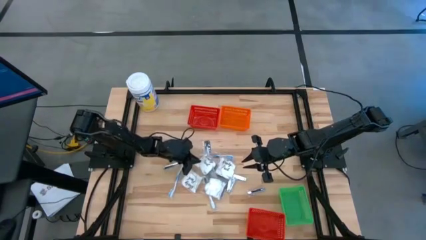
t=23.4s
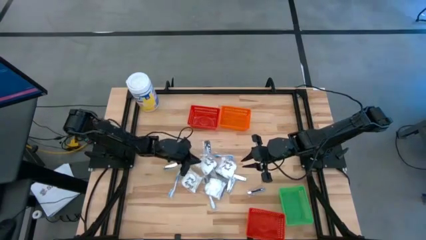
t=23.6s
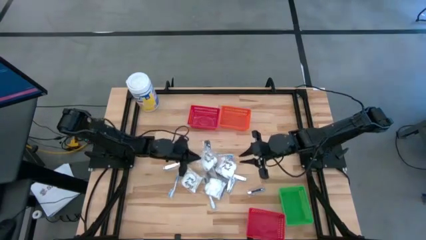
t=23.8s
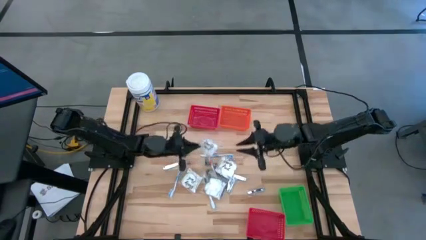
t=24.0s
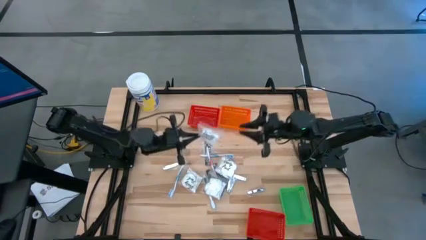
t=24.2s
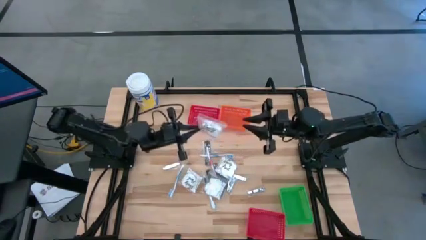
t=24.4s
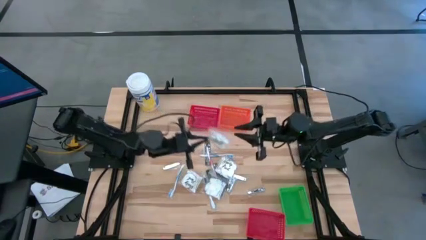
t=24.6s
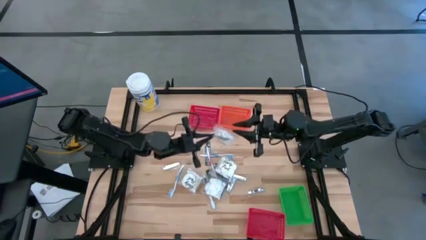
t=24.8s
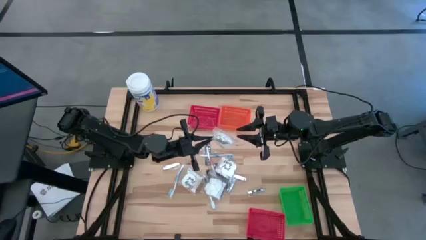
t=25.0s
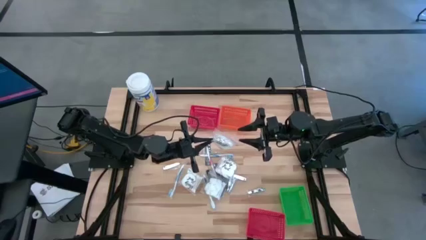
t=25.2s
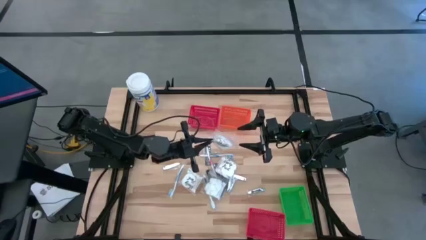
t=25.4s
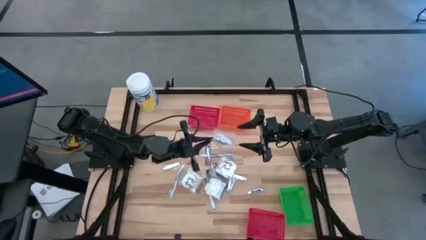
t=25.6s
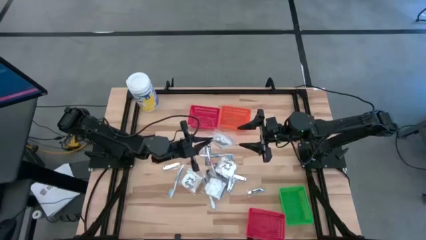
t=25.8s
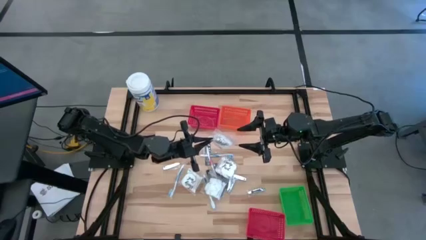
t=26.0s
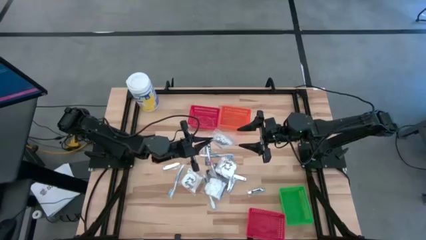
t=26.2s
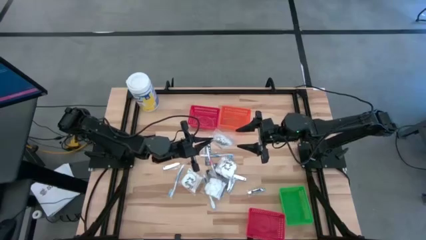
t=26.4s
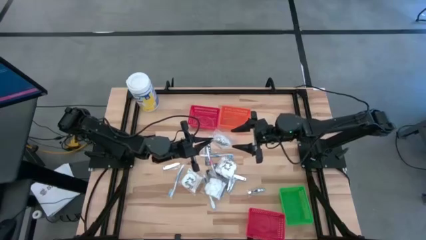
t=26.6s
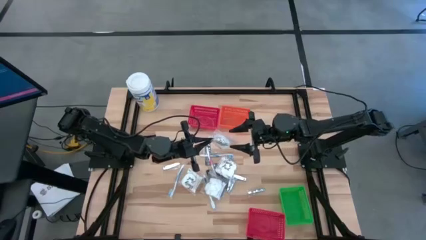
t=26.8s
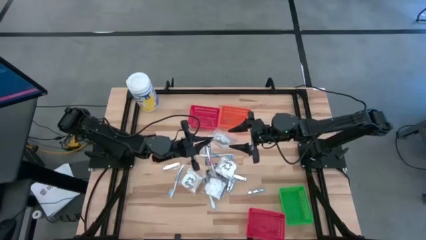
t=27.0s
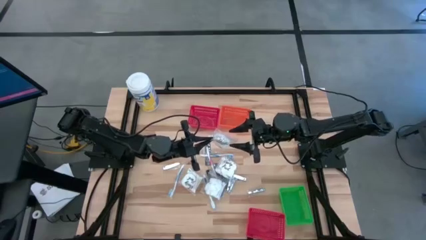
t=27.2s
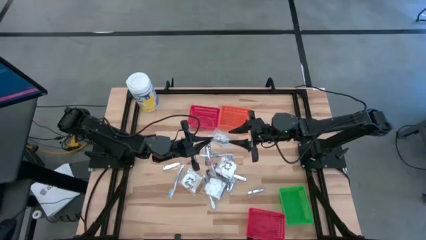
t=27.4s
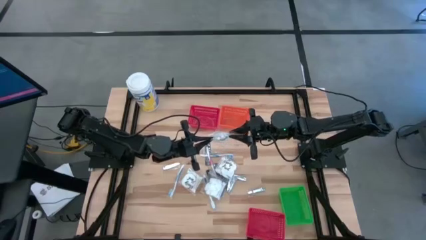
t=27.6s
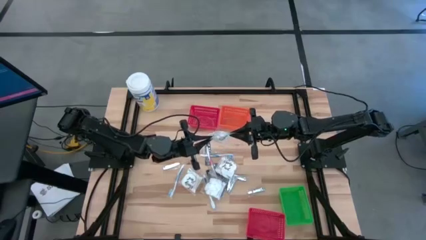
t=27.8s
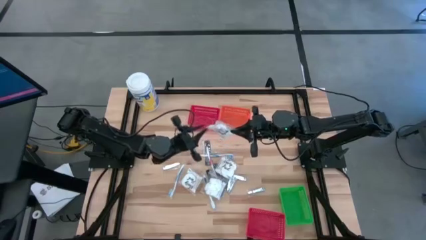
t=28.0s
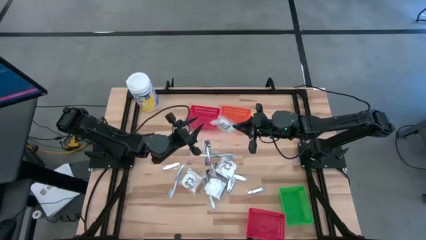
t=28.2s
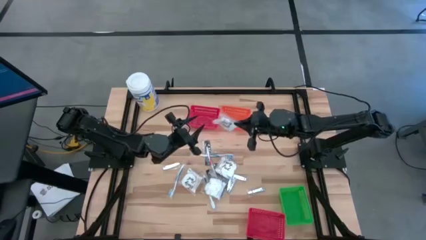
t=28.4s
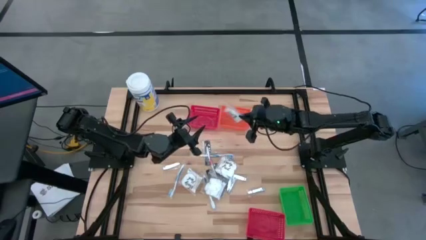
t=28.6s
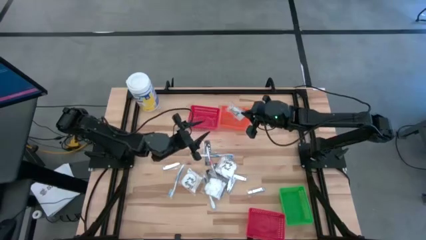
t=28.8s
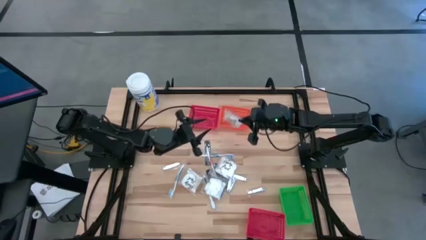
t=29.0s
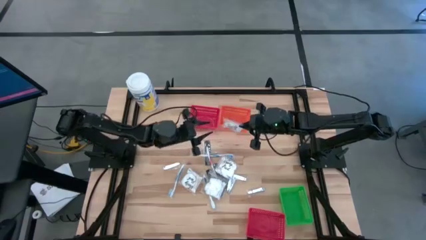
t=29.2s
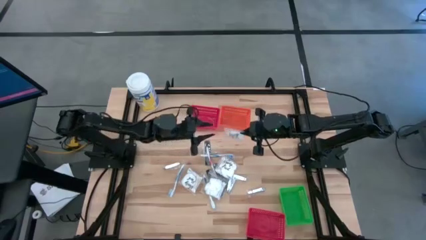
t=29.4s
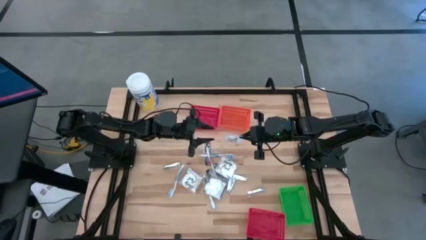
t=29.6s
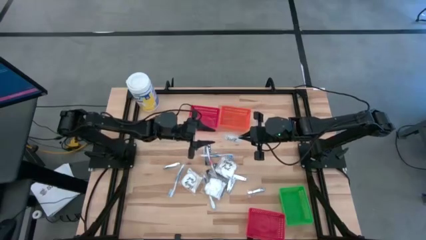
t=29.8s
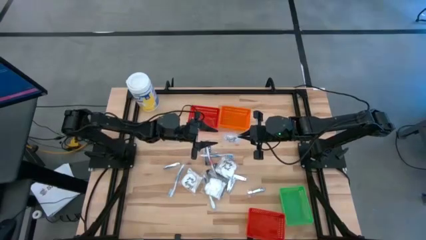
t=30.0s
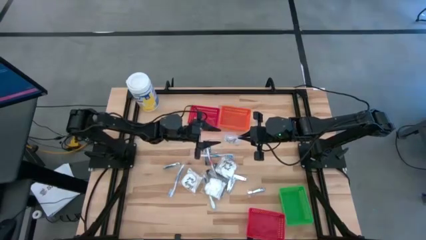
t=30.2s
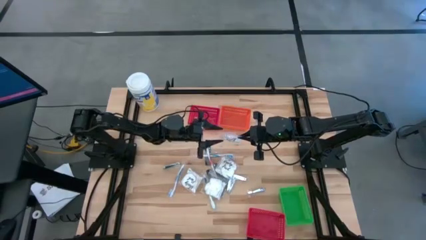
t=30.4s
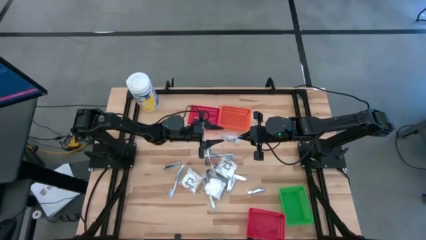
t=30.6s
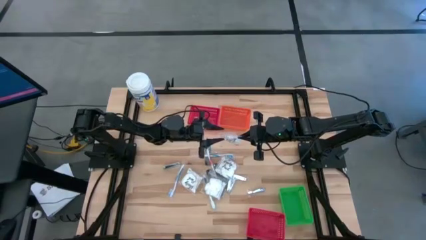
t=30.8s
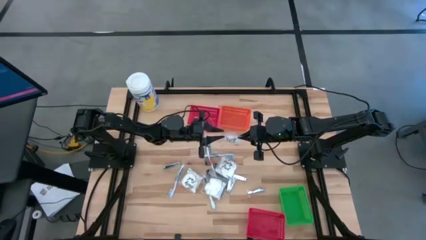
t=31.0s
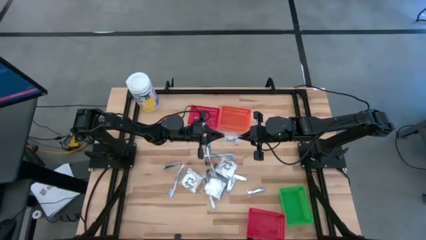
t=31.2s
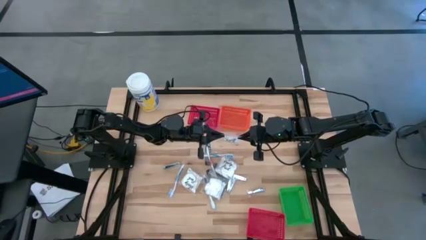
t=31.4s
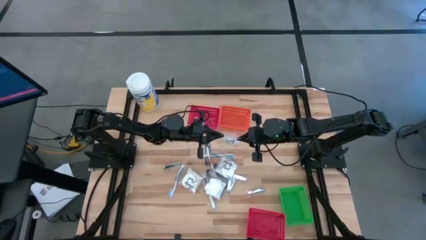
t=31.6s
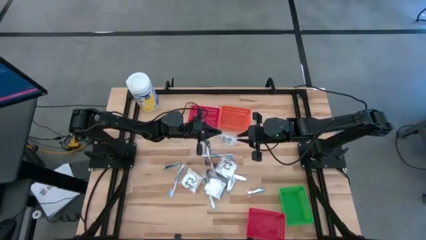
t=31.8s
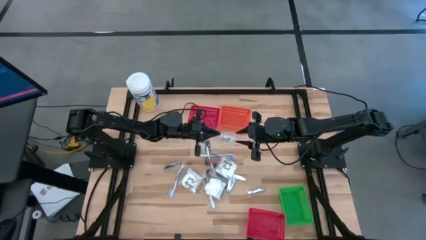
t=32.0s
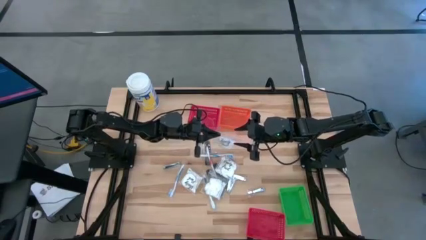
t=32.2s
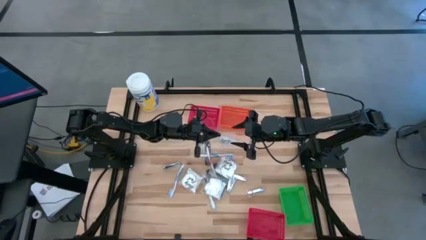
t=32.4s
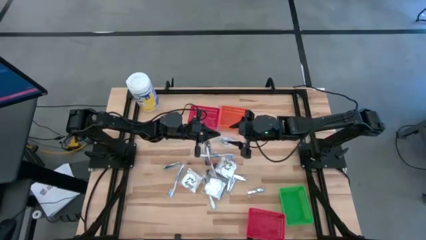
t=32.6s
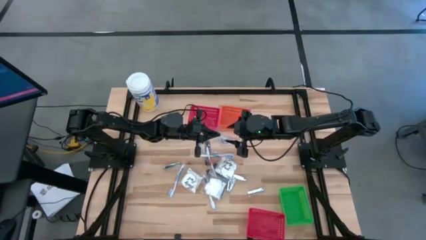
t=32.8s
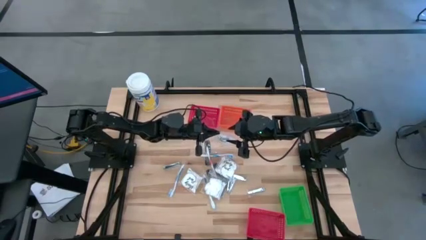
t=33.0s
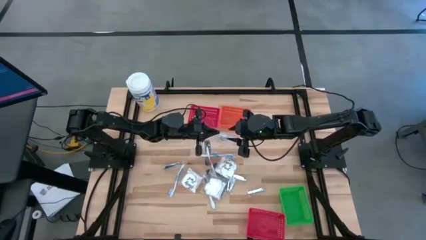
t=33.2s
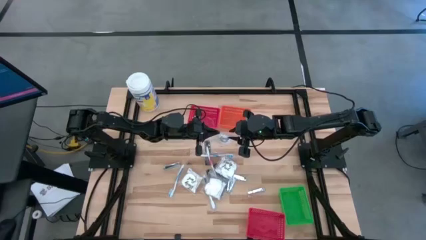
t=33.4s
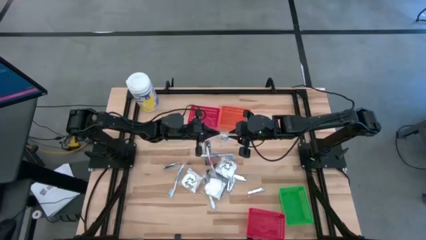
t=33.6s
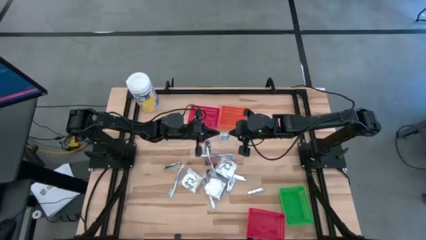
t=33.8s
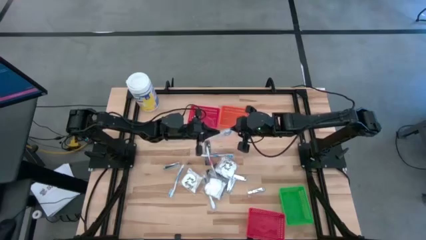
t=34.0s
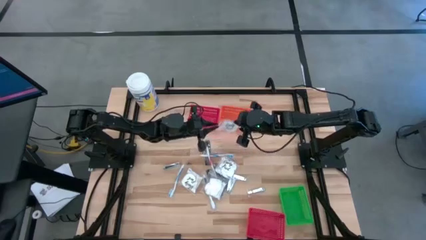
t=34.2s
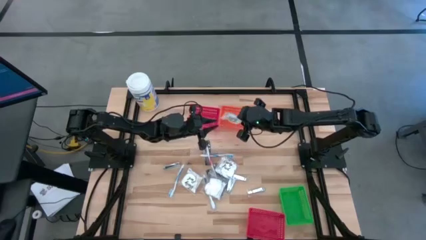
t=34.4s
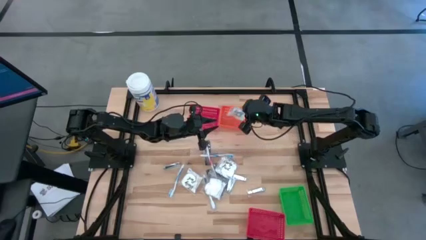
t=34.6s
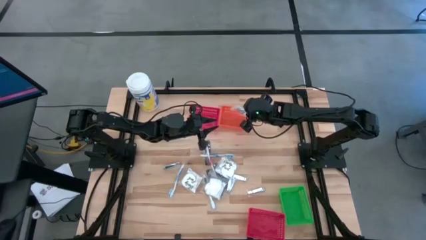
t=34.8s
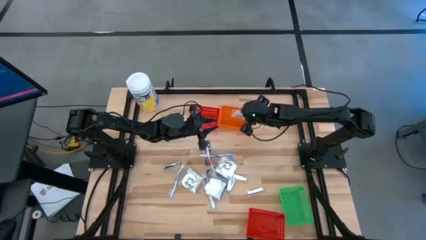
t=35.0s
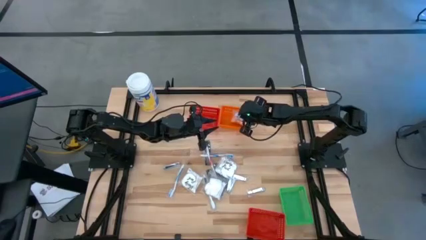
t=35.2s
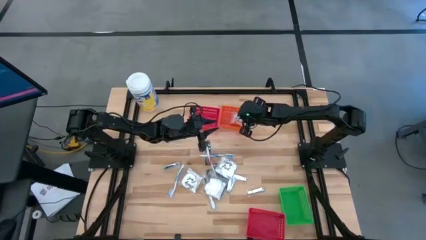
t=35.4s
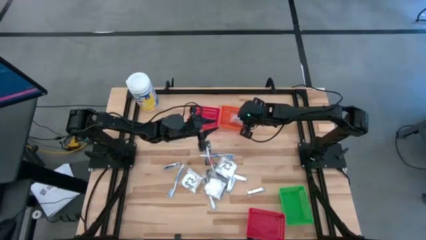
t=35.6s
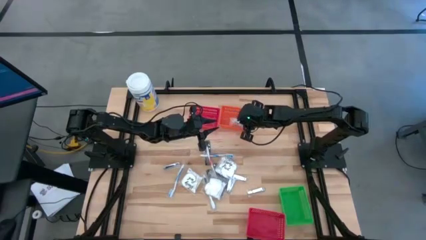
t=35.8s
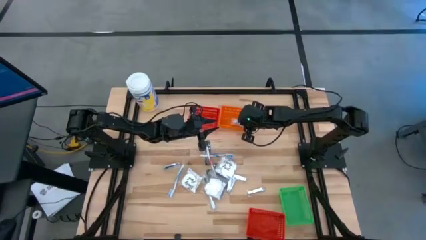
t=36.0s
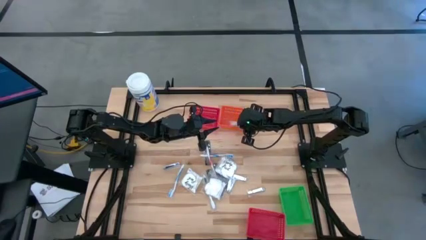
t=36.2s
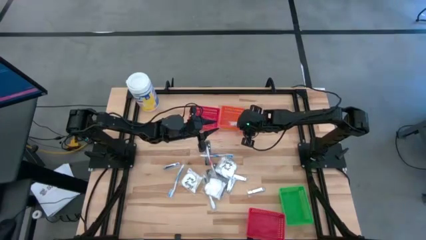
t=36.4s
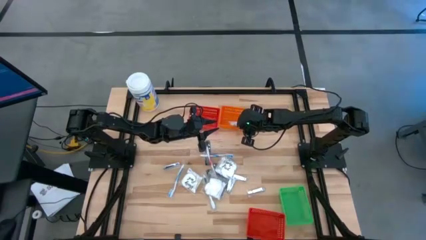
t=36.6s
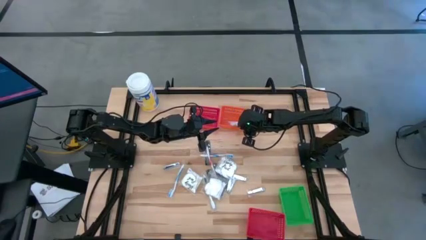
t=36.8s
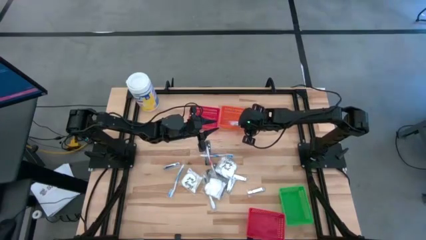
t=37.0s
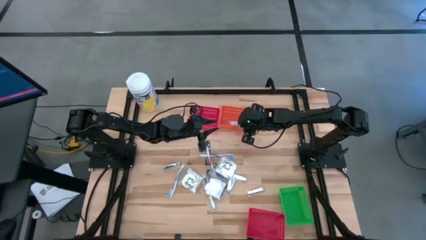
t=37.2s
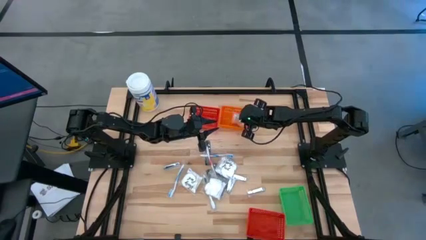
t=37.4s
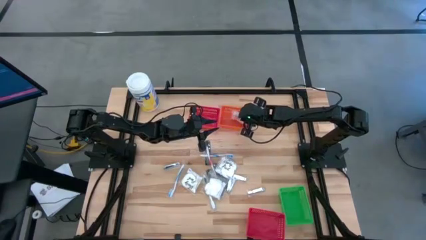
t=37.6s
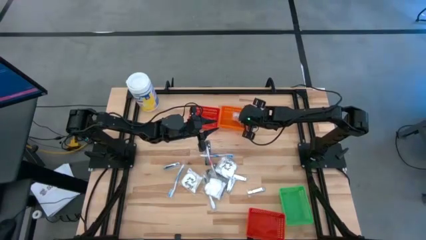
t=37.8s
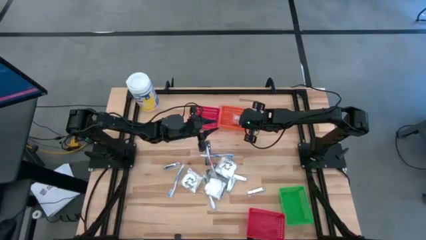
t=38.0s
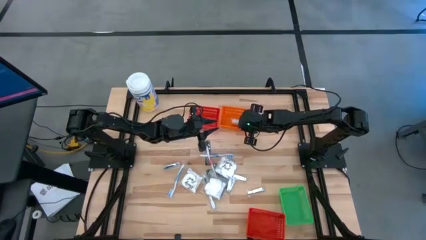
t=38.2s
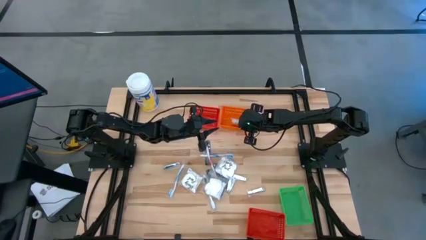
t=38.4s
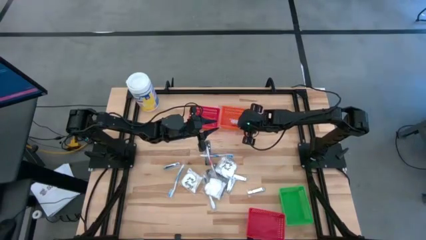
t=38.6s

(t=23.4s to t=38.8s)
Task: Pick & Place Travel size toiletries
Put the white cotton pack into the orange bin

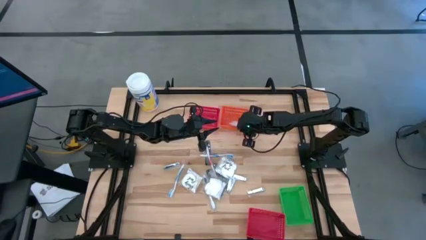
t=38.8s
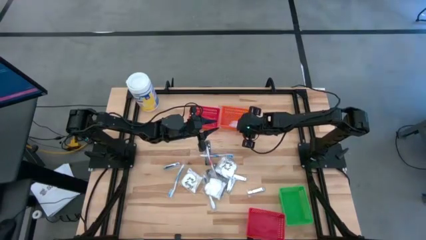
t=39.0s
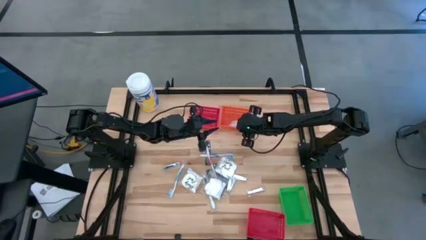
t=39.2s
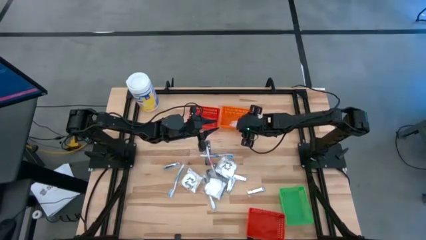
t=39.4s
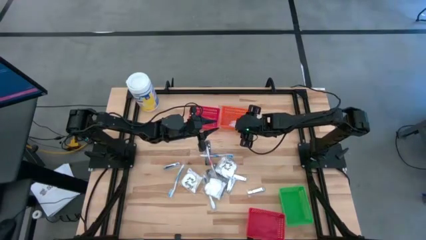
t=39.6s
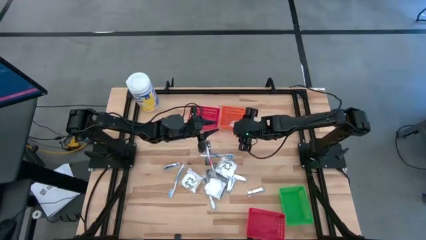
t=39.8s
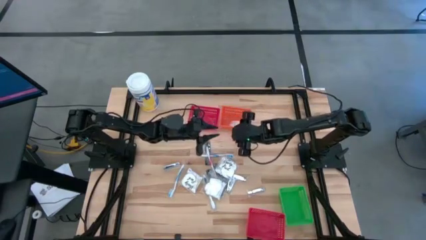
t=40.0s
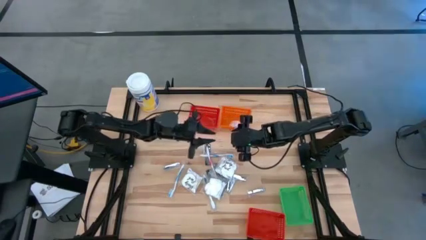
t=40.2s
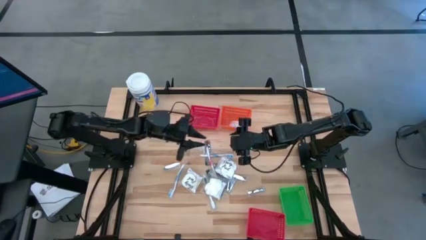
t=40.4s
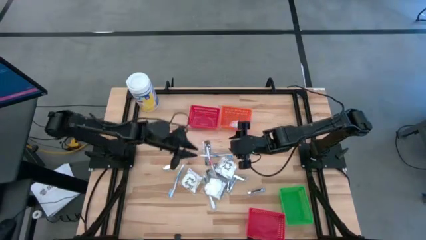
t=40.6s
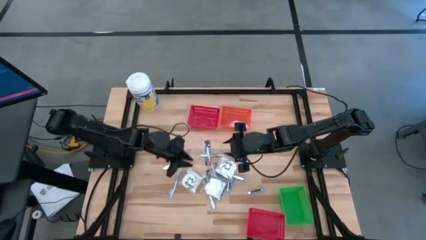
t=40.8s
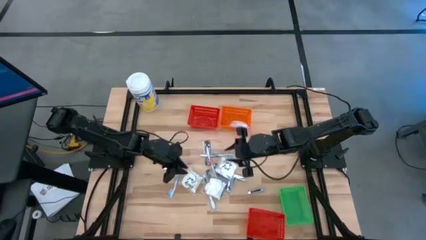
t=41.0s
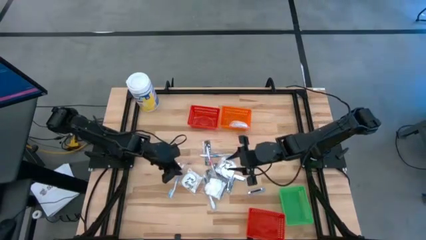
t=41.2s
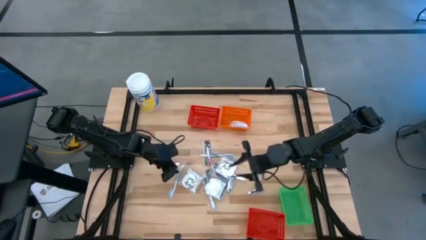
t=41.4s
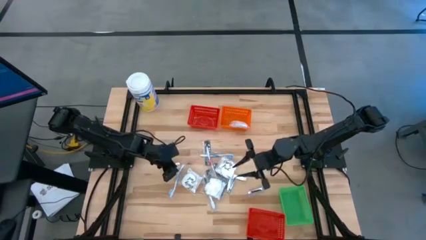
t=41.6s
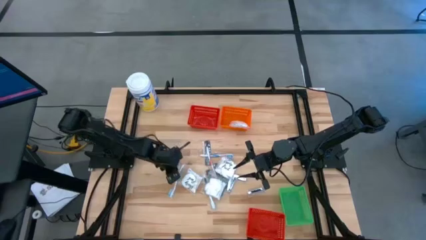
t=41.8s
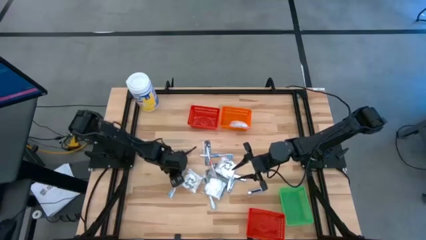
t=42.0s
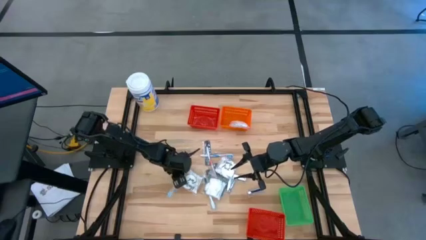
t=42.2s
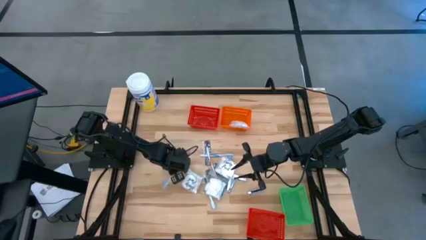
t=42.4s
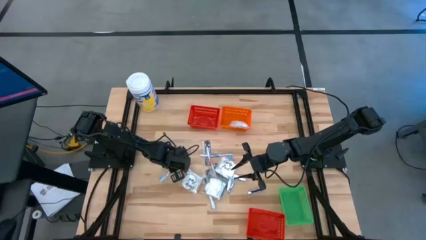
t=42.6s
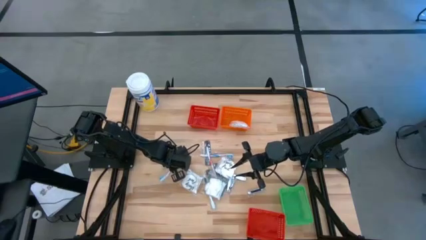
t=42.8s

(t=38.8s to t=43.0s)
Put the blue toothbrush into the top red bin
